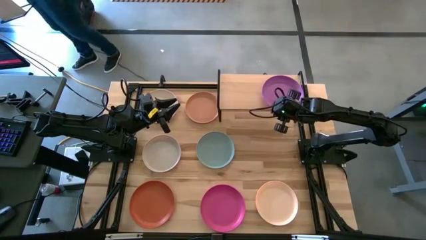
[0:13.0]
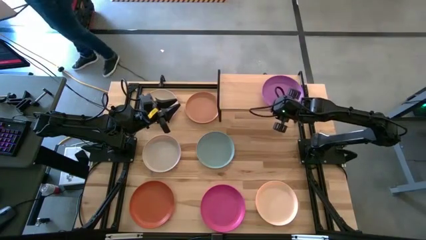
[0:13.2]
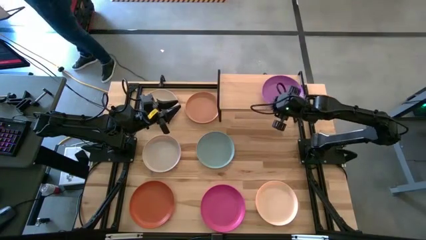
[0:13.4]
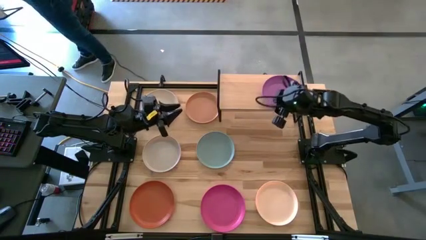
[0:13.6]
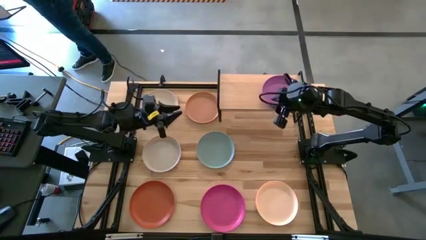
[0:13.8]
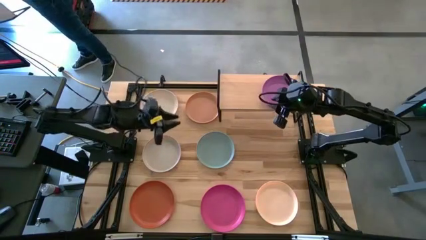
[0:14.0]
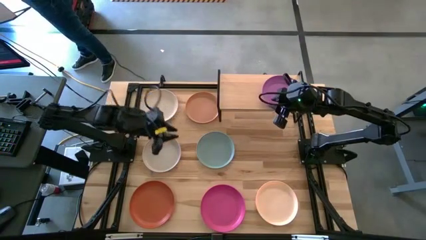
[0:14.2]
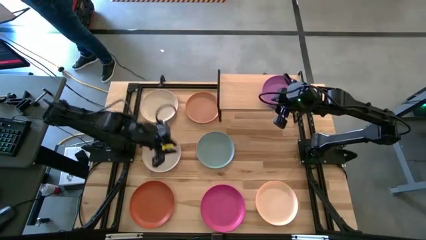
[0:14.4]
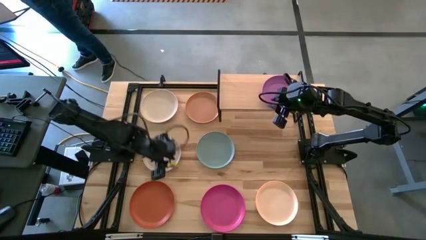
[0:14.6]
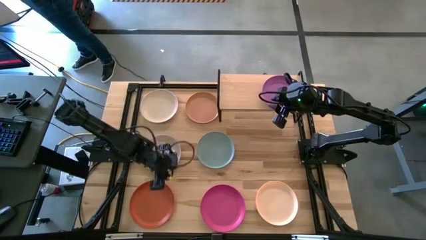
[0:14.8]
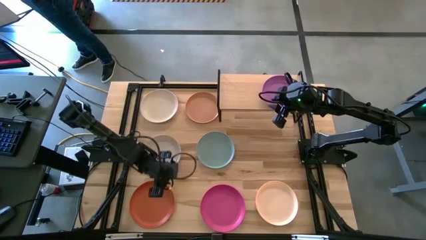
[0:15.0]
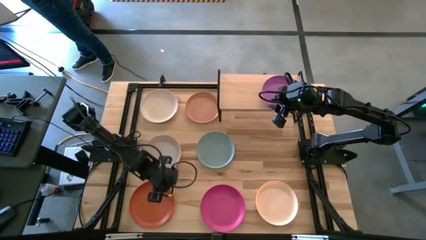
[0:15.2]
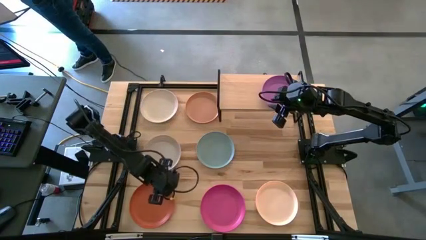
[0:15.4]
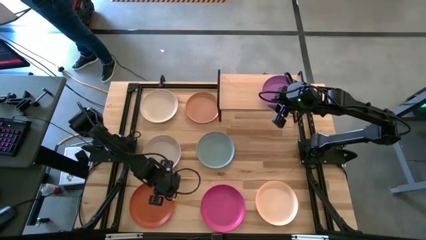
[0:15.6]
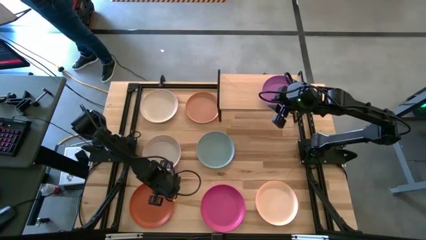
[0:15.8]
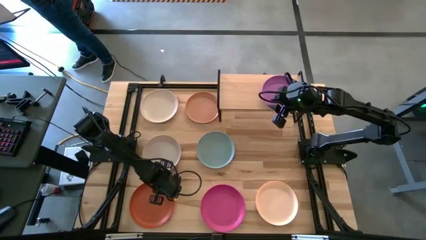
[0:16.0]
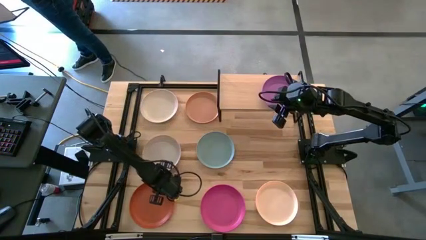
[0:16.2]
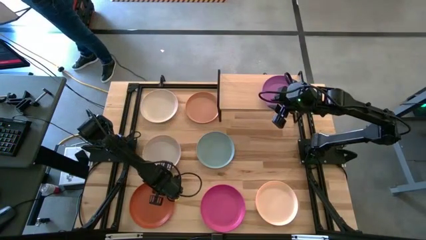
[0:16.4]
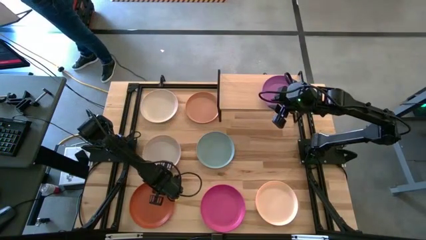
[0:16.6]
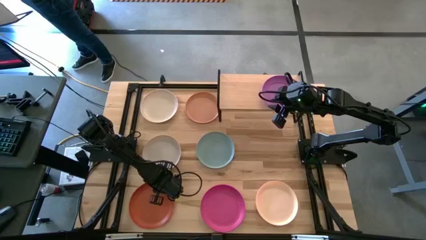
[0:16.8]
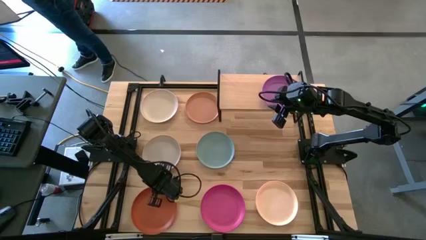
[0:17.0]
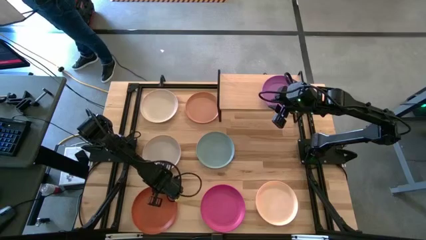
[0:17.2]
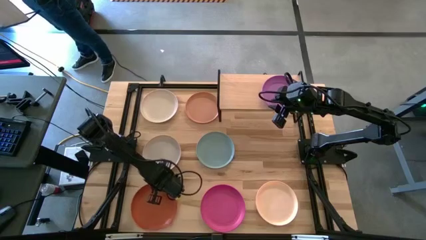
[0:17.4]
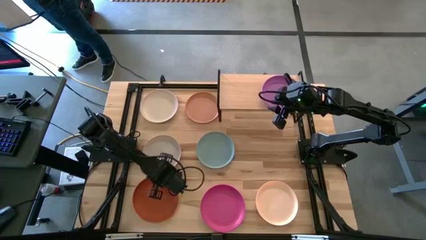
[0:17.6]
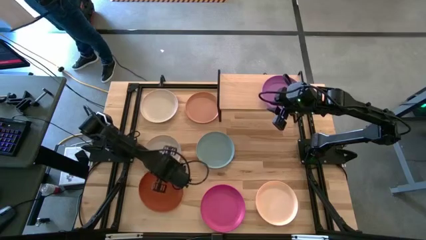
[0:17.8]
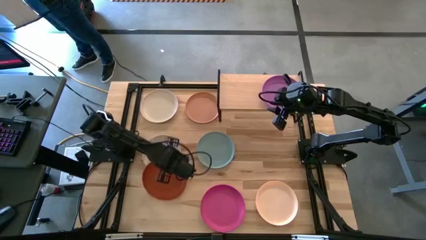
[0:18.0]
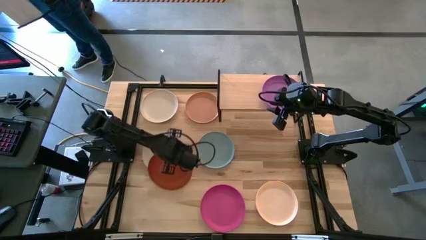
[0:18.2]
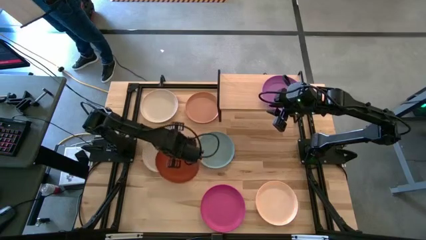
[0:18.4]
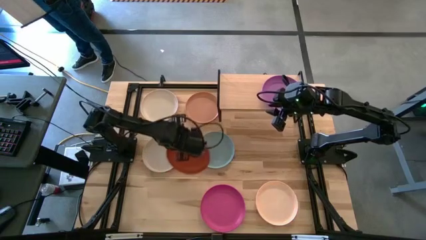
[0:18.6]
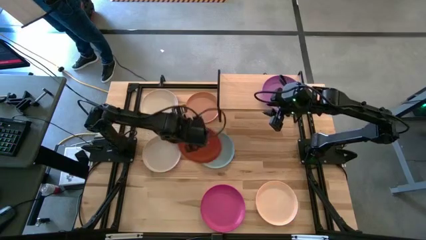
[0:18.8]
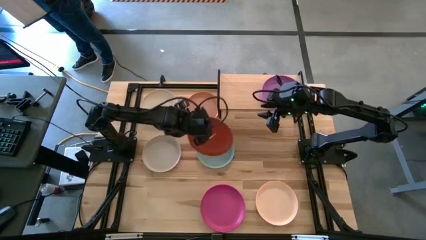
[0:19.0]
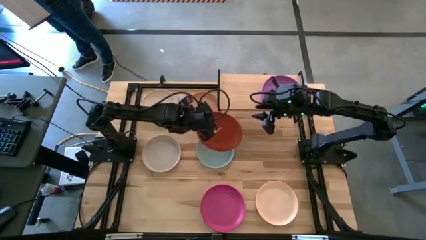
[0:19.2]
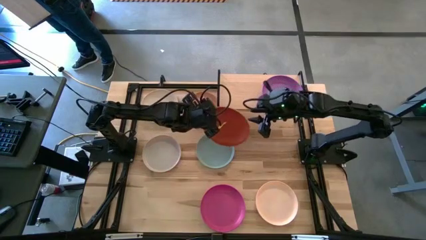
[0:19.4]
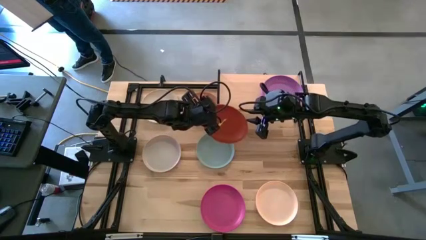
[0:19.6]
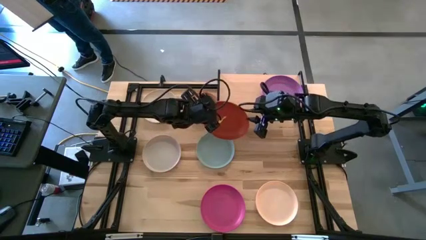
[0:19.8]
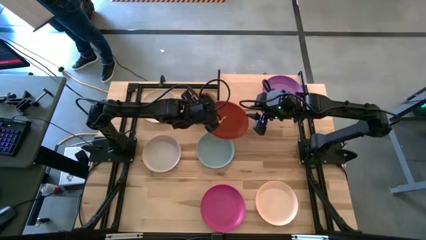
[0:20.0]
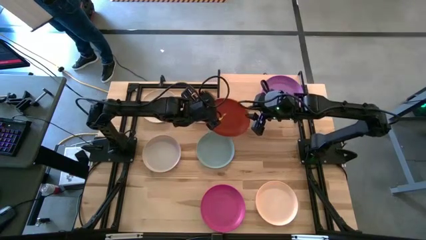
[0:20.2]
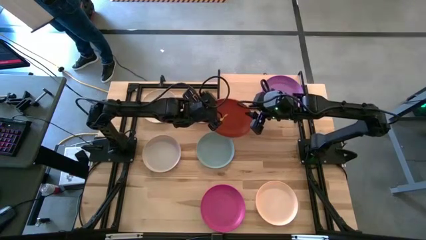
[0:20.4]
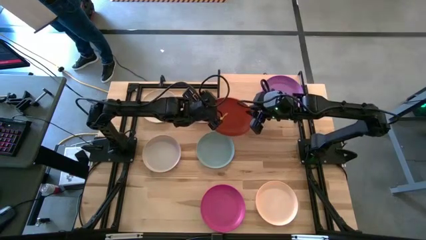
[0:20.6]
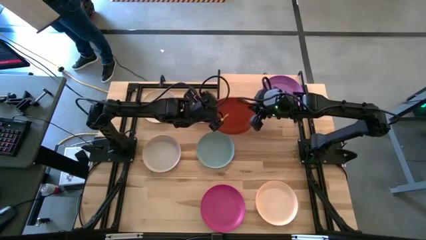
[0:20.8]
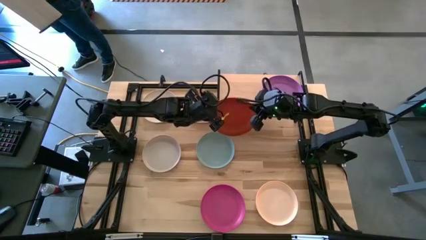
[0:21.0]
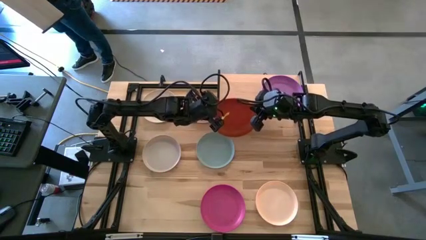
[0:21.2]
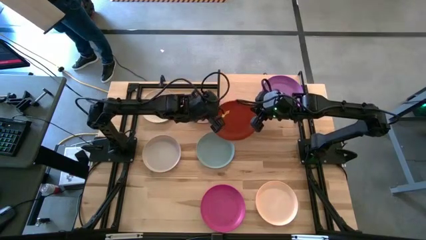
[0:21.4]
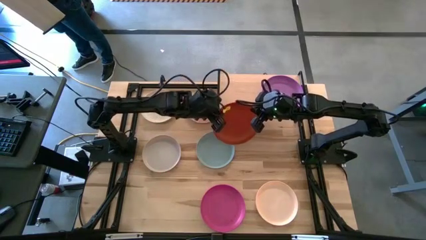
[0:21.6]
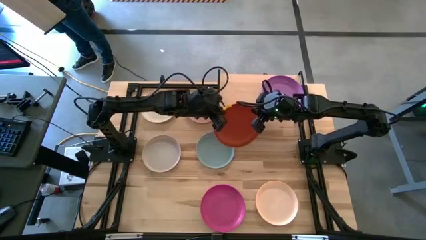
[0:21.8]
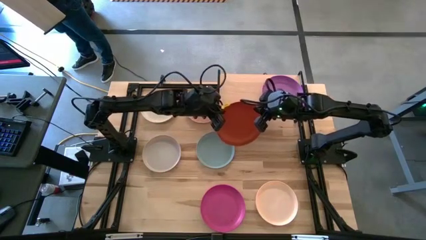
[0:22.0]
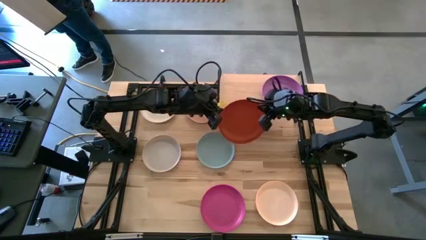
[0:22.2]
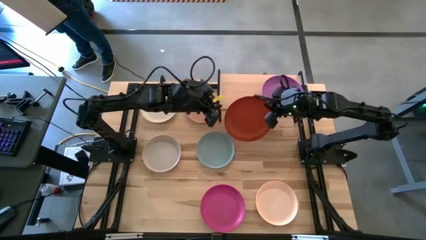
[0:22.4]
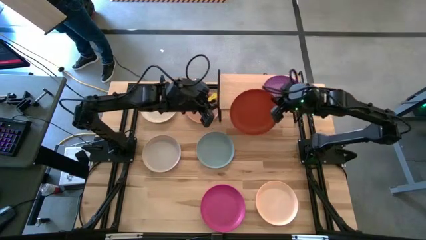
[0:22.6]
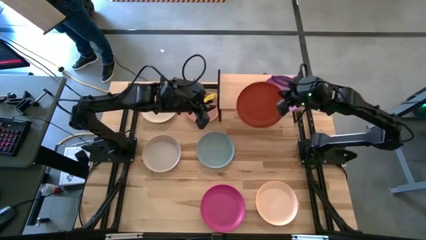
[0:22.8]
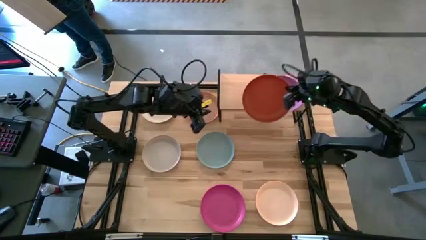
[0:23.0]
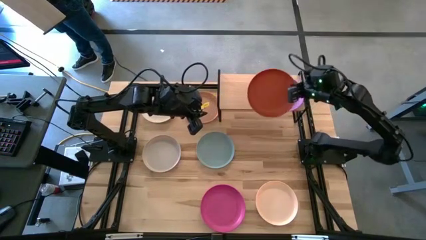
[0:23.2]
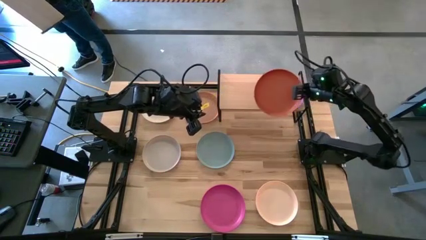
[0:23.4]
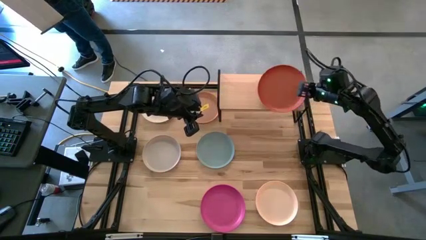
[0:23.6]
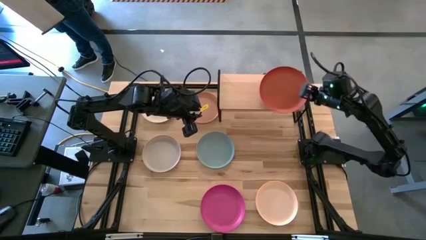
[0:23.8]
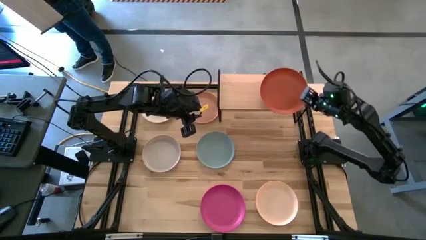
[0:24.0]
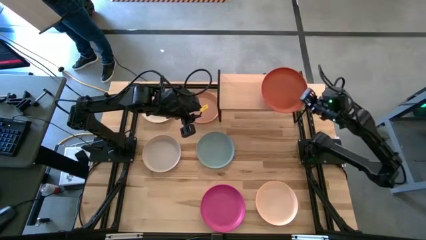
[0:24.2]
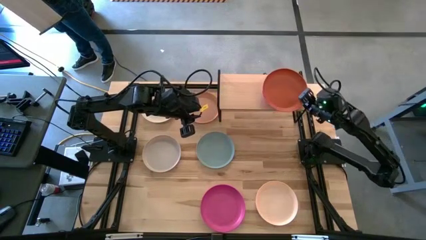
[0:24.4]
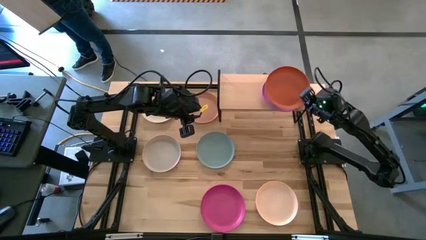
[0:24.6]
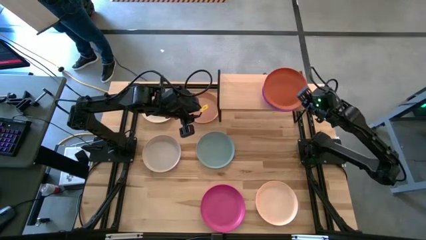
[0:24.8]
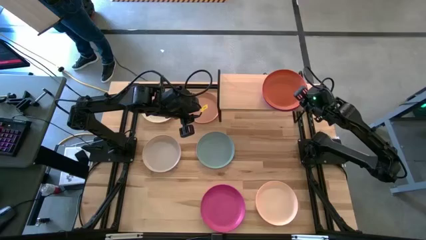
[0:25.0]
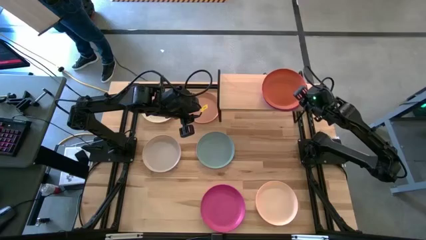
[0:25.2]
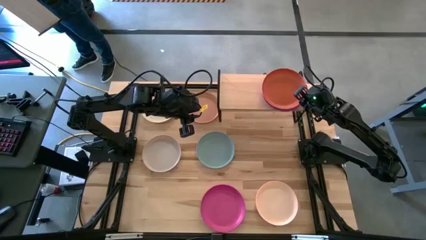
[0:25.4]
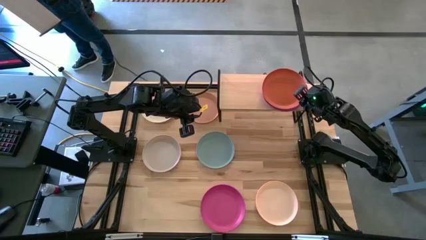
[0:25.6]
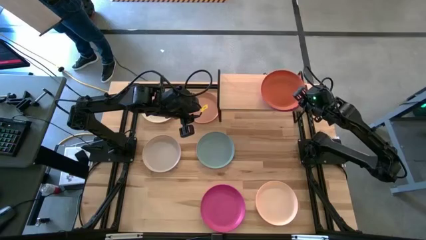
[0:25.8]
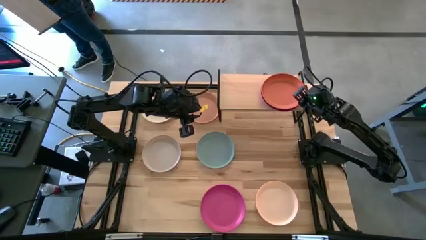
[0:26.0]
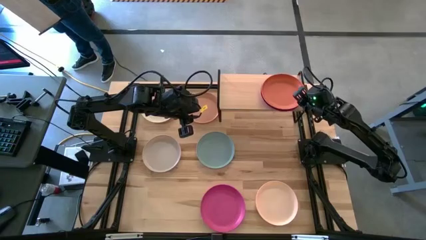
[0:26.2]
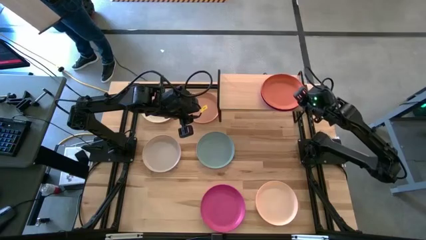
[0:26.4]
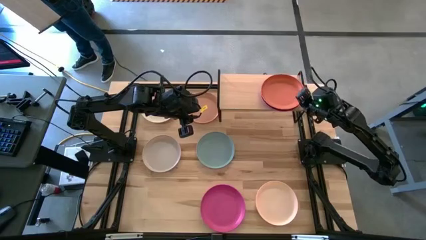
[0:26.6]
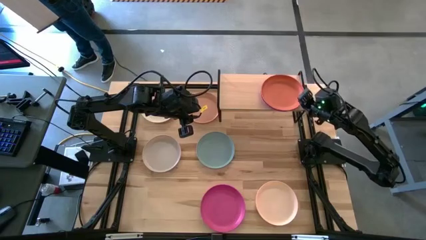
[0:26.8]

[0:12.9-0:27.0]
Task: Place and stack plates onto a shelf
Stack the orange plate on the purple plate on the shelf
